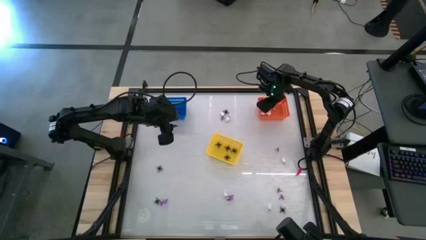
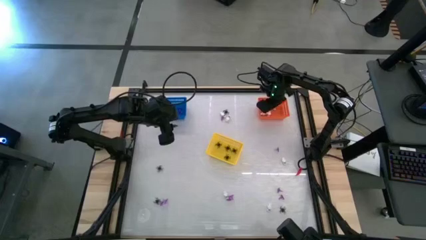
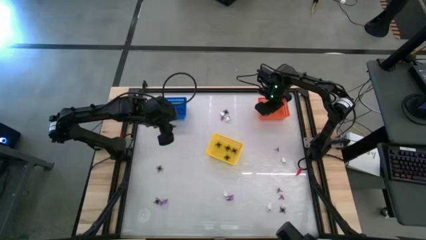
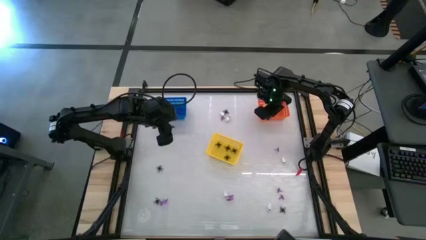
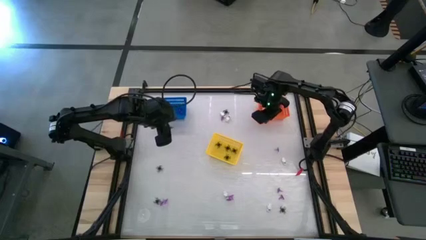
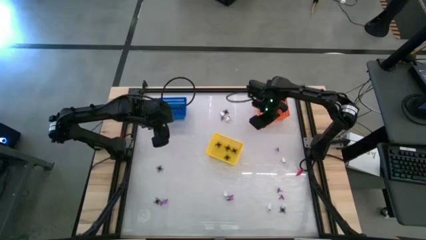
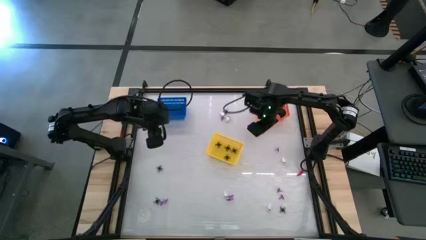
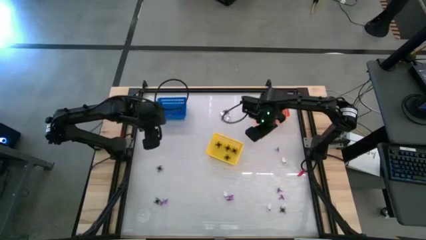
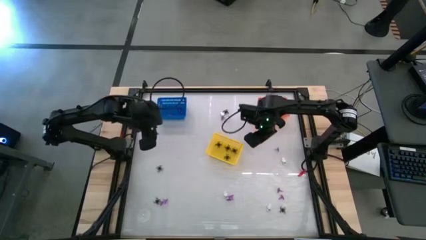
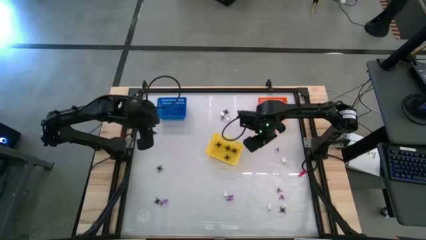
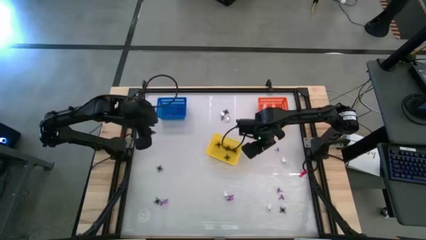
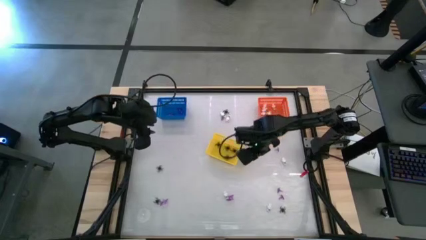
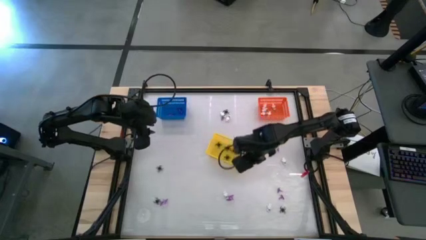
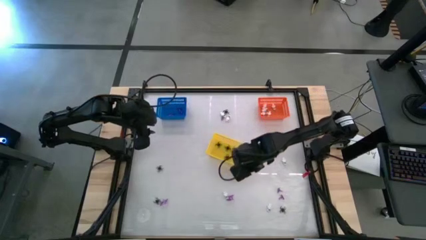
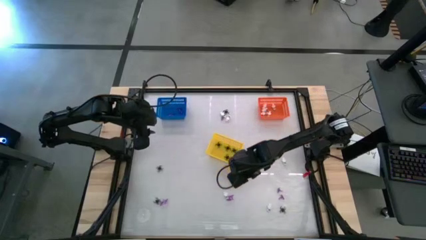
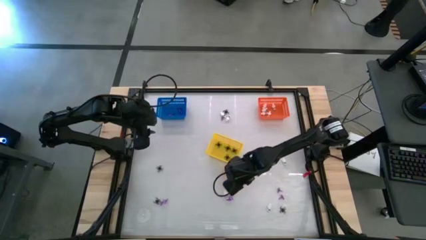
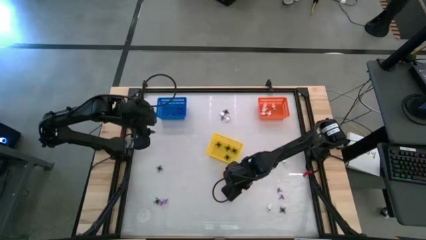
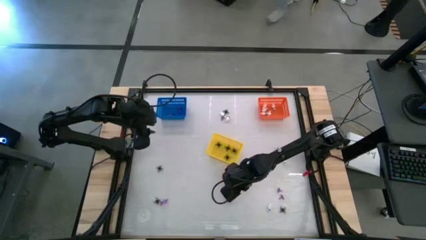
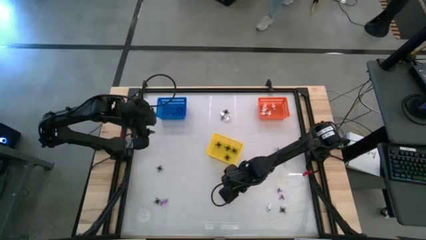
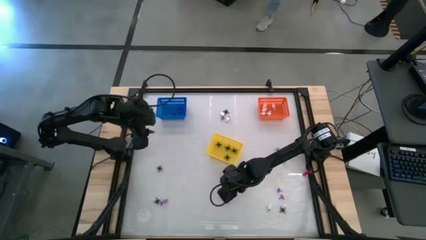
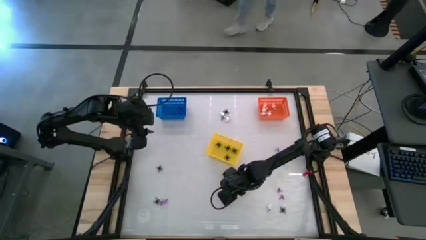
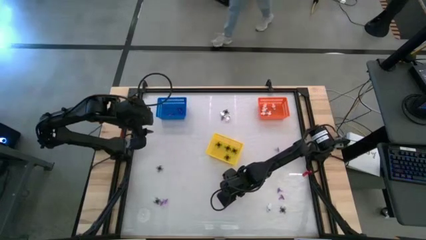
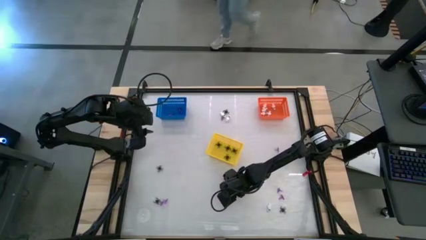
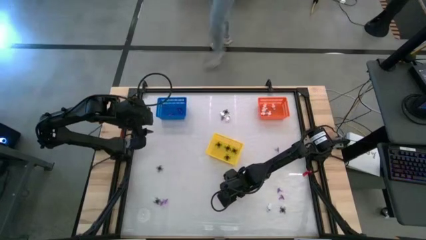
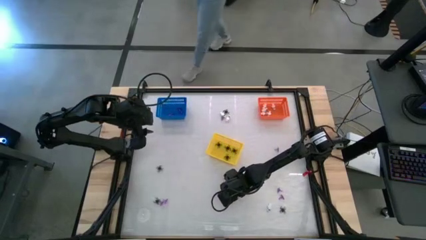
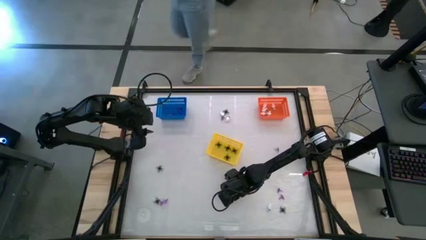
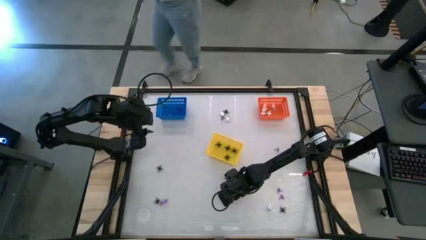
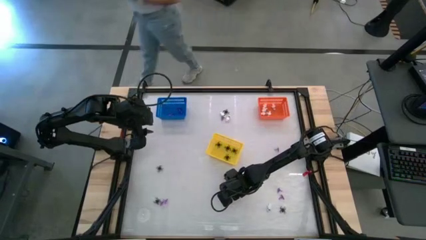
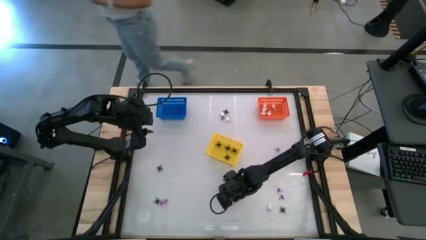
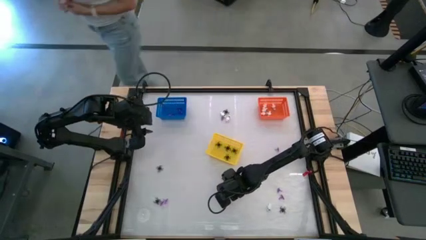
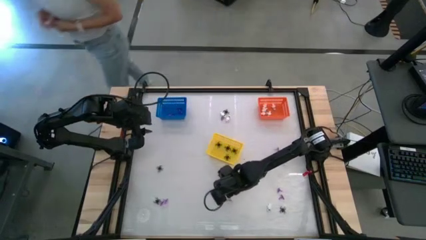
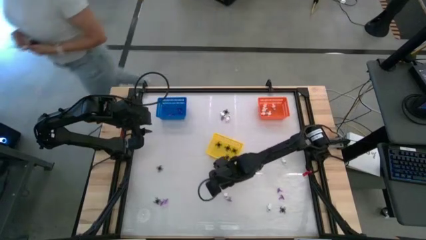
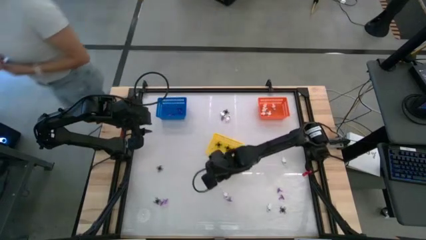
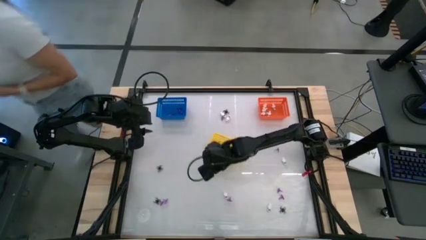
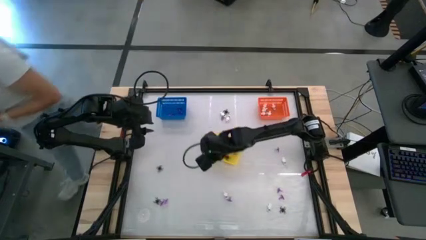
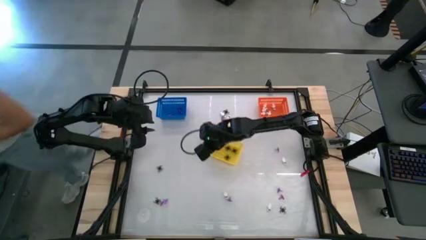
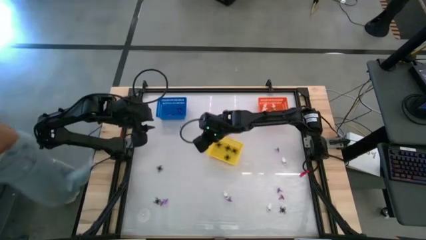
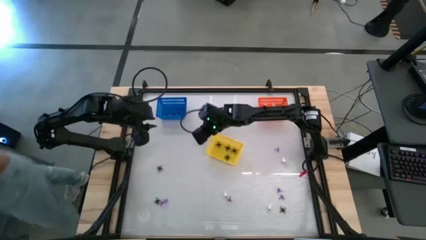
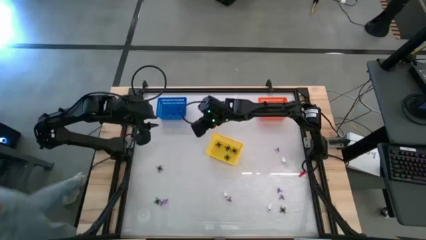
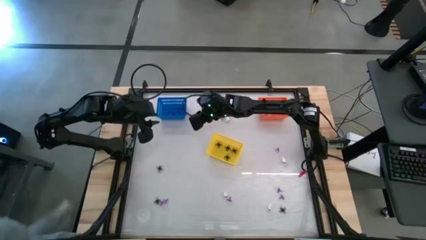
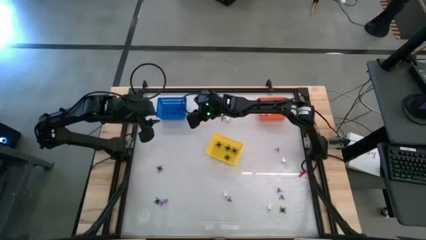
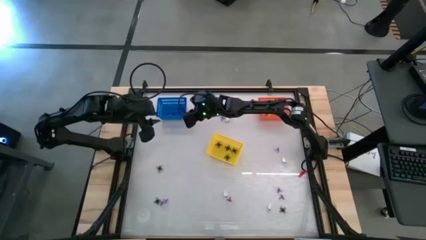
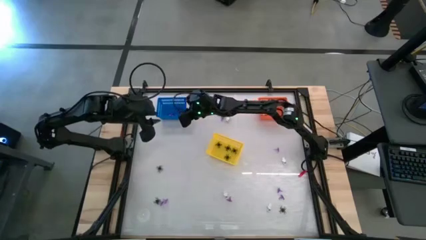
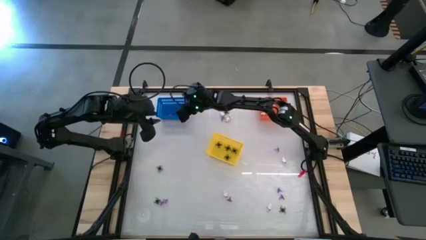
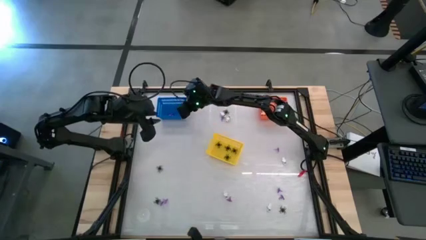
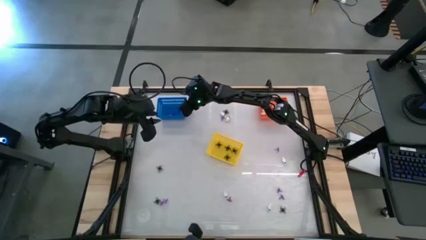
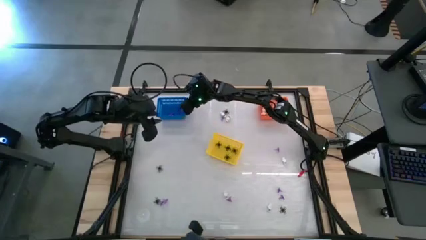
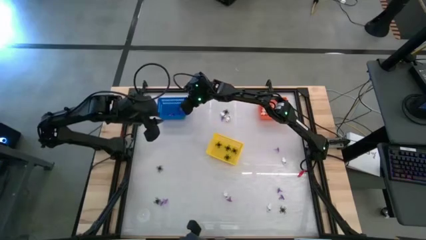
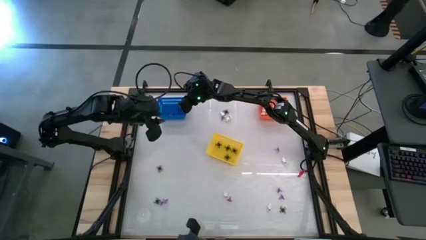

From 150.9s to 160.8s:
Task: Sort Halloween decoration
Put the purple witch hat toy into the blue bin

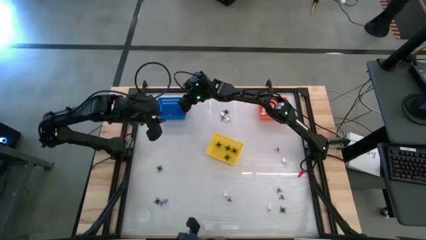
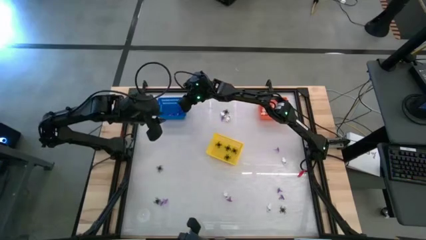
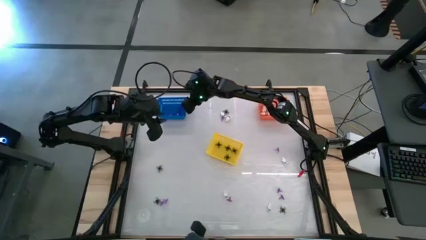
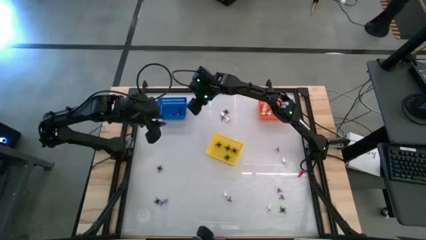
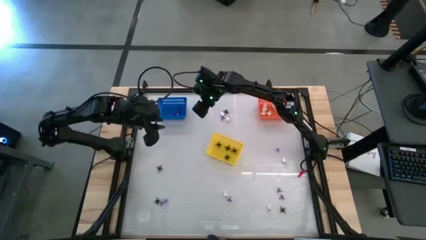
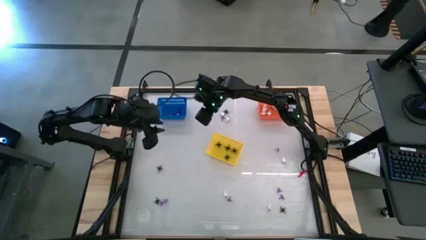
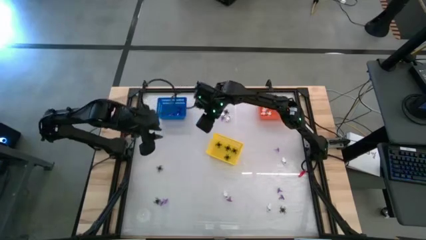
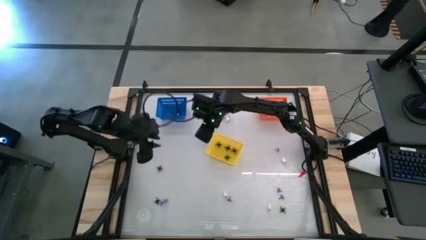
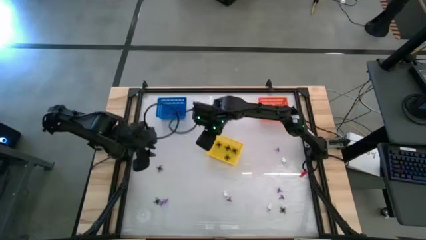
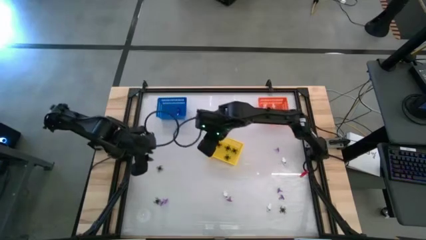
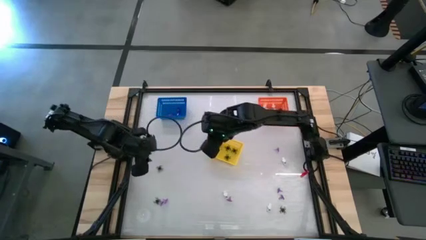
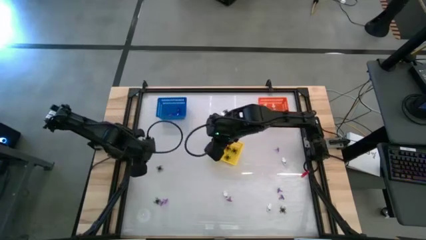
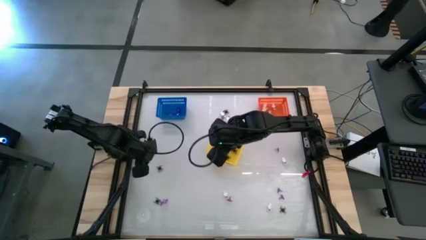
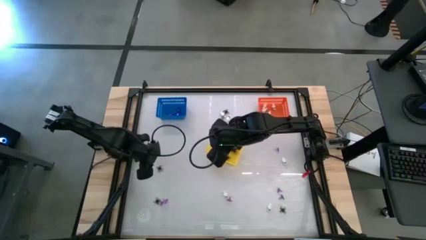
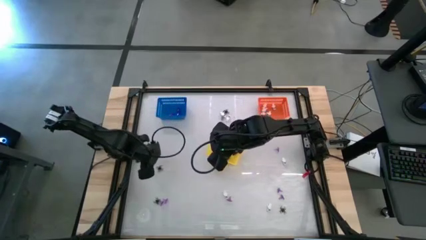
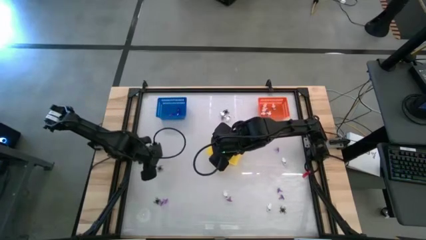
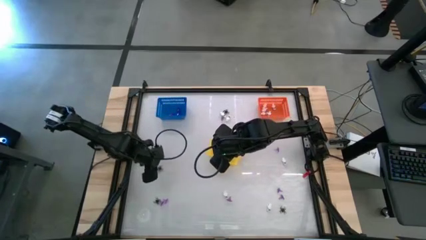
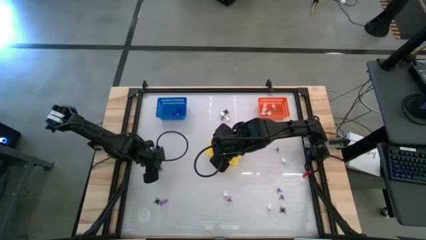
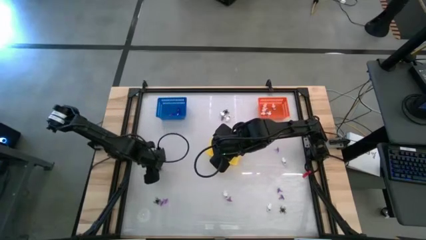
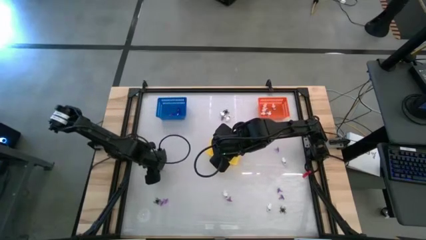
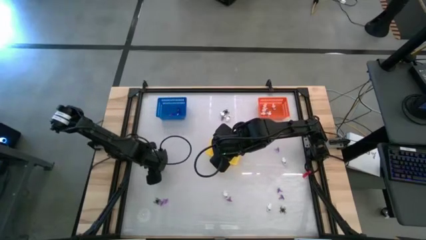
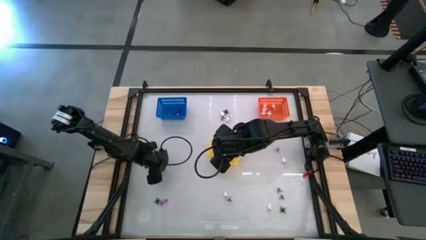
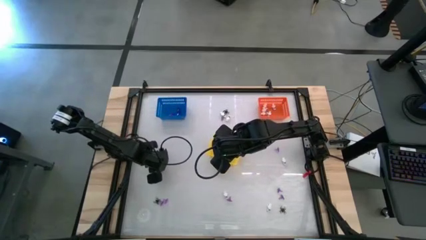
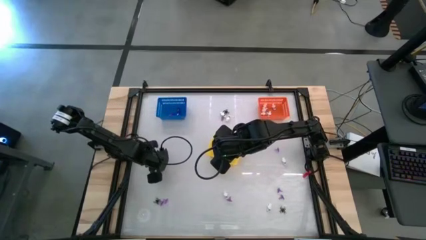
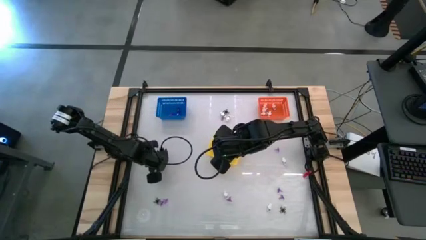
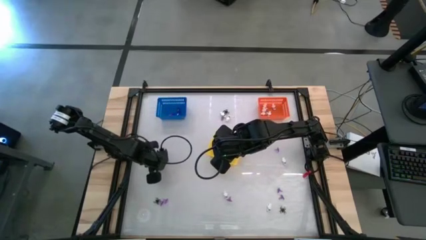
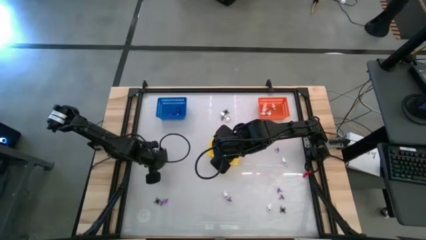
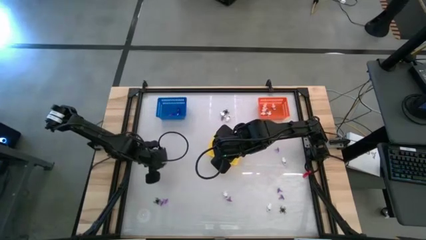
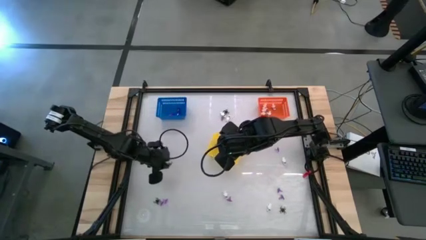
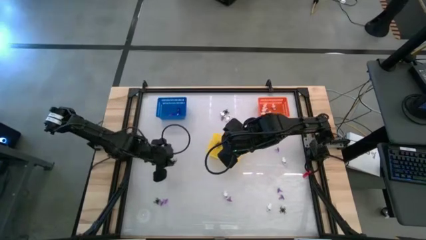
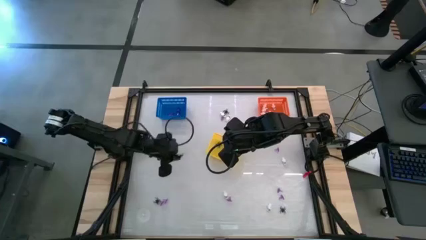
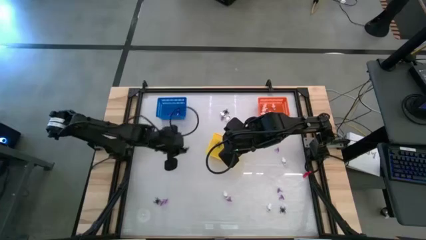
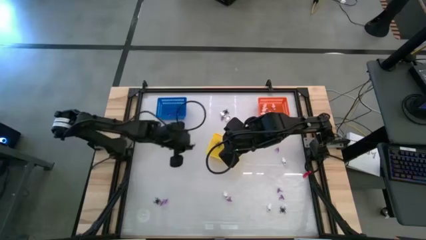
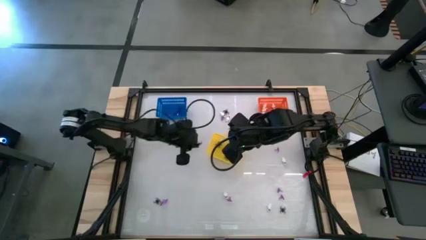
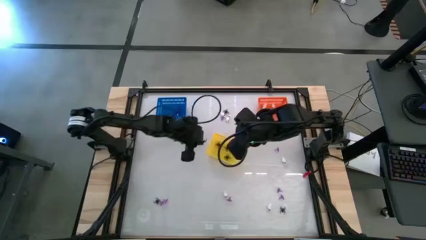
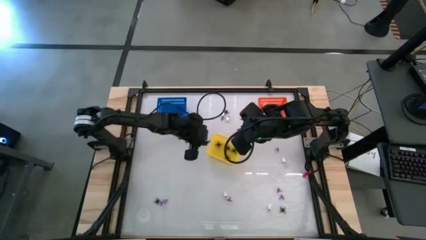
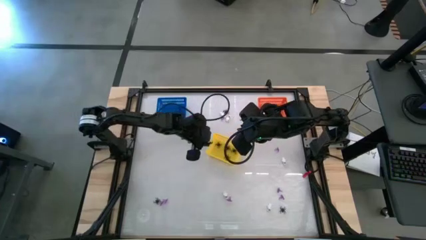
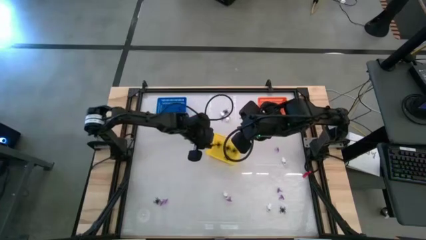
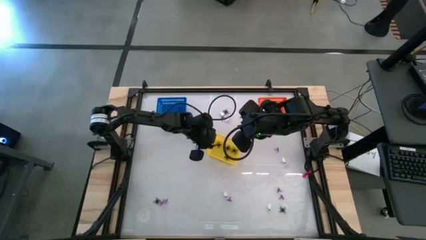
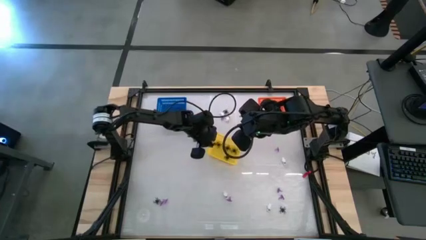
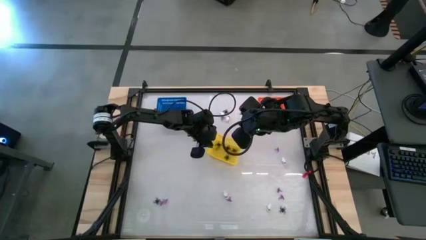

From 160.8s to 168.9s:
Put the black spider toy into the yellow bin
